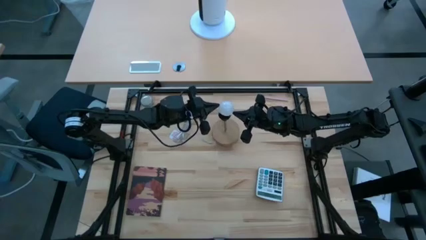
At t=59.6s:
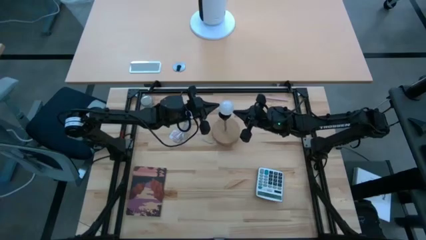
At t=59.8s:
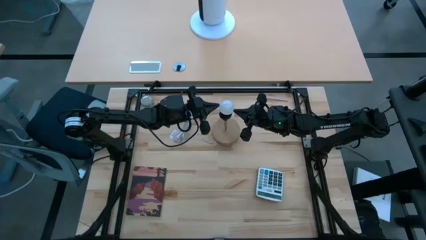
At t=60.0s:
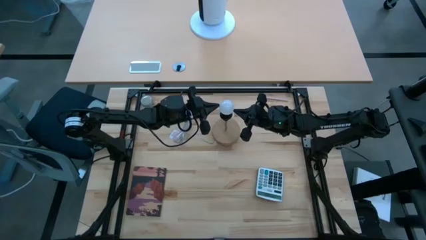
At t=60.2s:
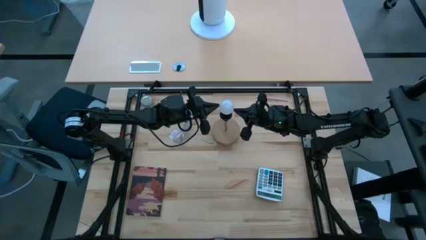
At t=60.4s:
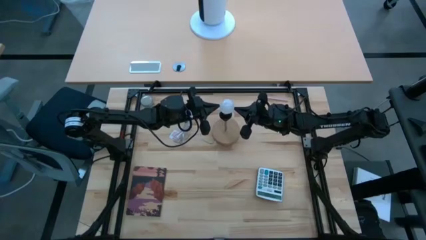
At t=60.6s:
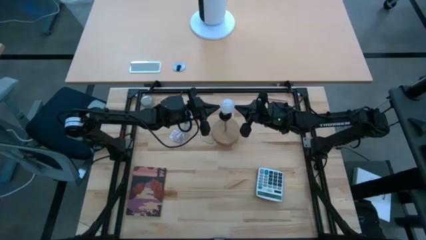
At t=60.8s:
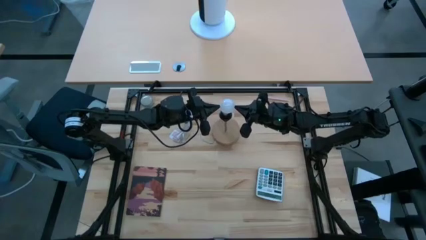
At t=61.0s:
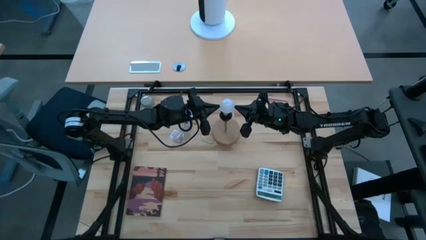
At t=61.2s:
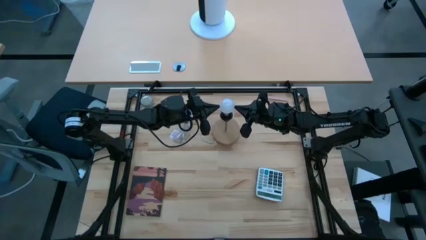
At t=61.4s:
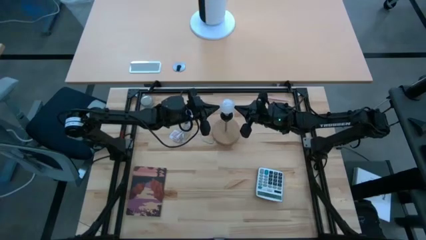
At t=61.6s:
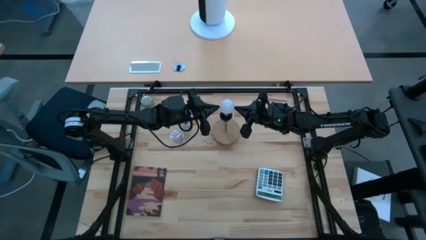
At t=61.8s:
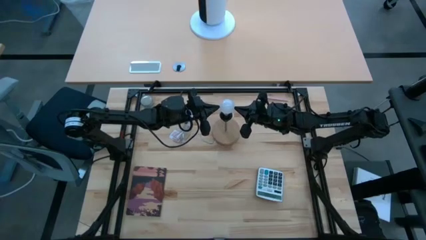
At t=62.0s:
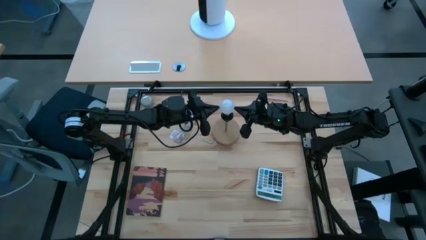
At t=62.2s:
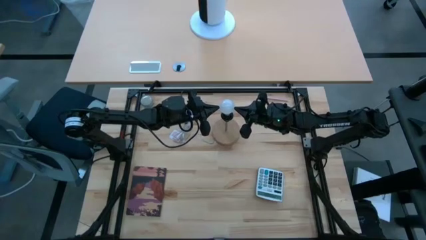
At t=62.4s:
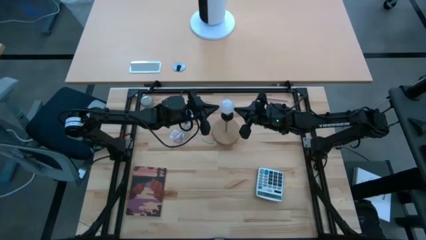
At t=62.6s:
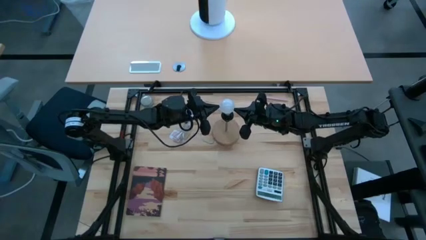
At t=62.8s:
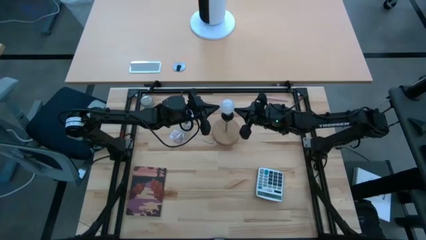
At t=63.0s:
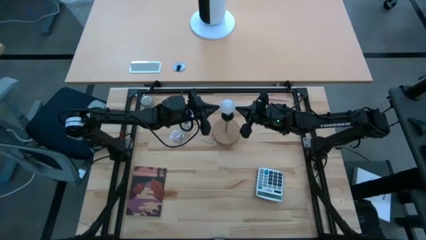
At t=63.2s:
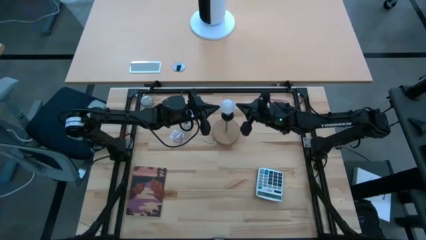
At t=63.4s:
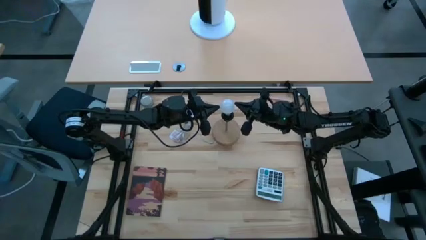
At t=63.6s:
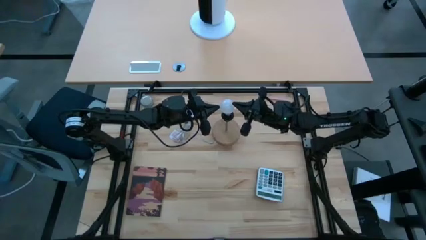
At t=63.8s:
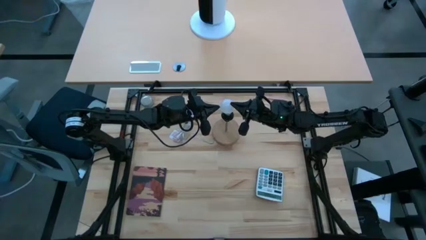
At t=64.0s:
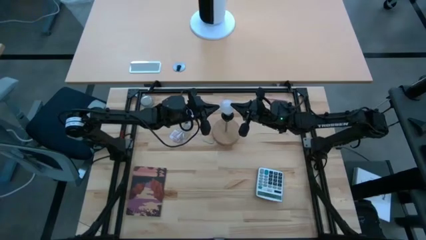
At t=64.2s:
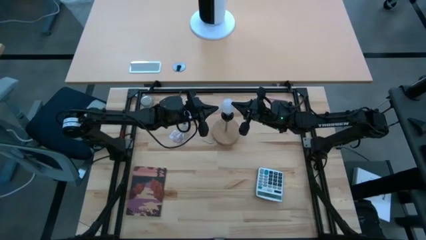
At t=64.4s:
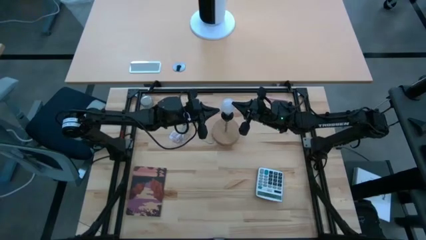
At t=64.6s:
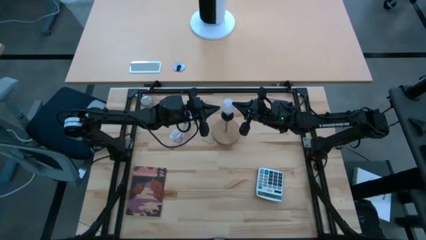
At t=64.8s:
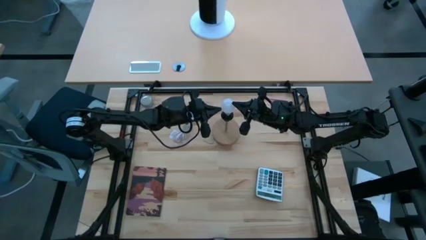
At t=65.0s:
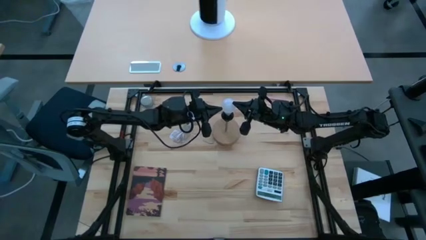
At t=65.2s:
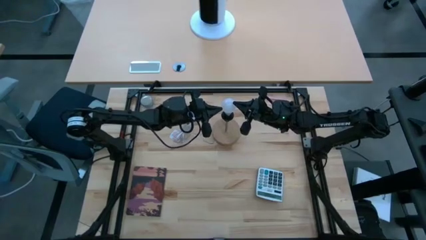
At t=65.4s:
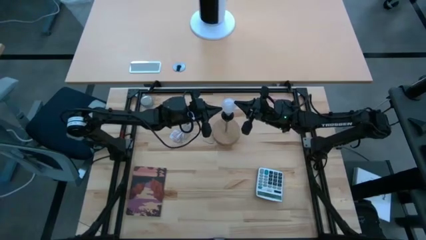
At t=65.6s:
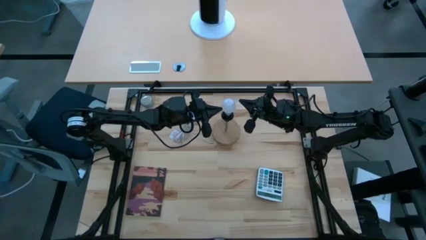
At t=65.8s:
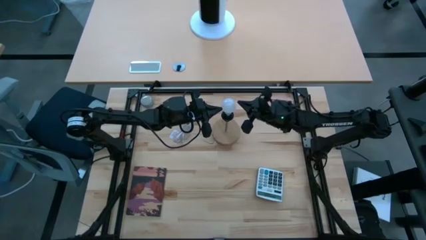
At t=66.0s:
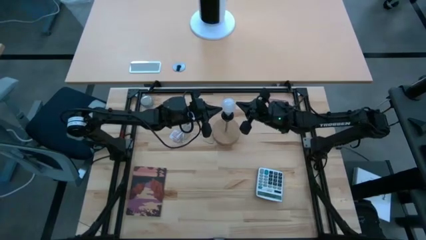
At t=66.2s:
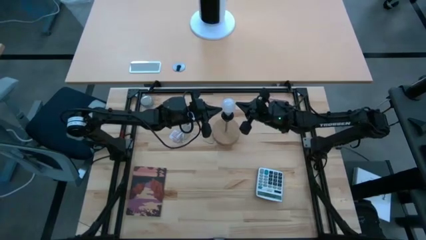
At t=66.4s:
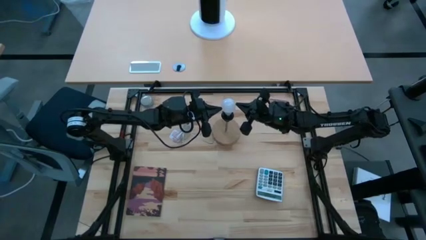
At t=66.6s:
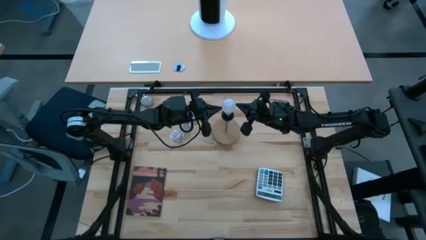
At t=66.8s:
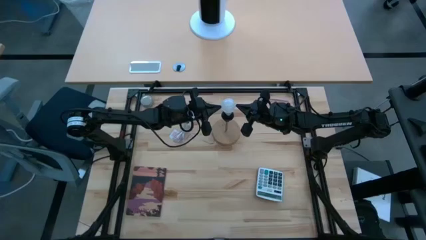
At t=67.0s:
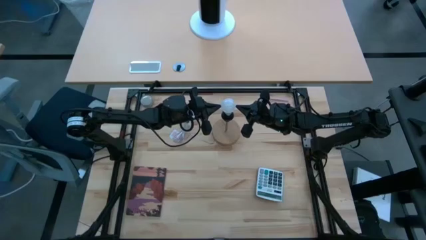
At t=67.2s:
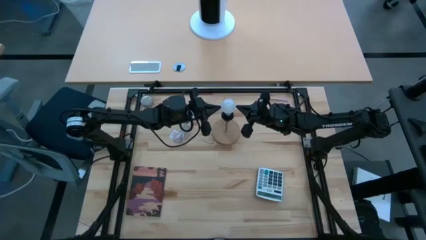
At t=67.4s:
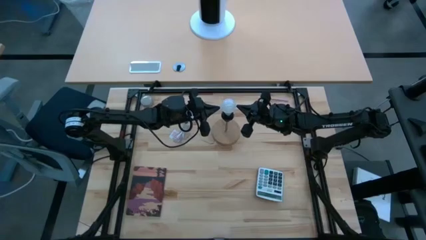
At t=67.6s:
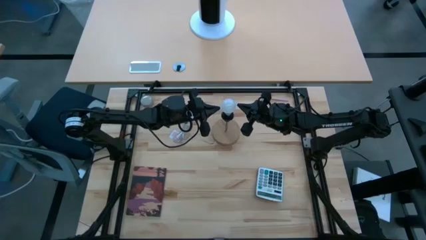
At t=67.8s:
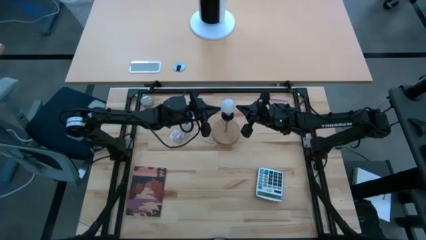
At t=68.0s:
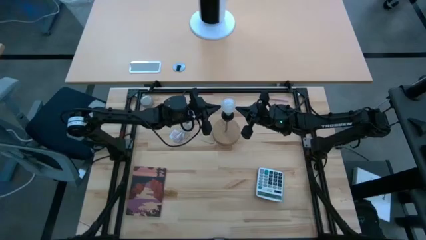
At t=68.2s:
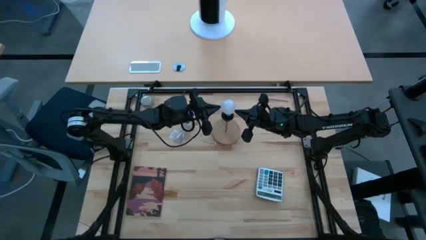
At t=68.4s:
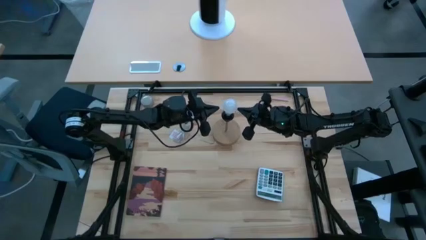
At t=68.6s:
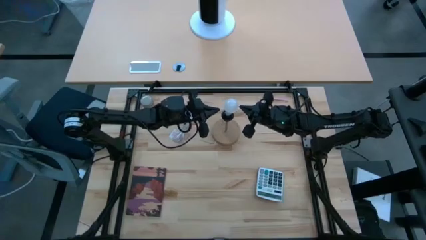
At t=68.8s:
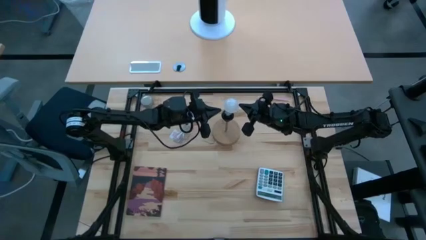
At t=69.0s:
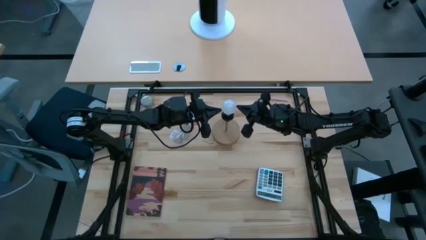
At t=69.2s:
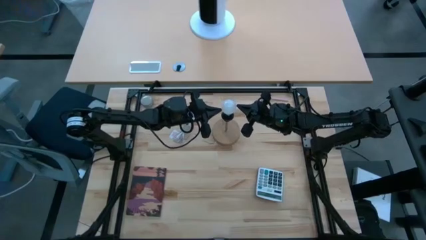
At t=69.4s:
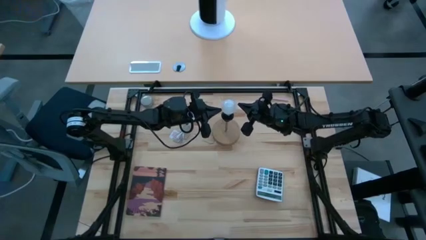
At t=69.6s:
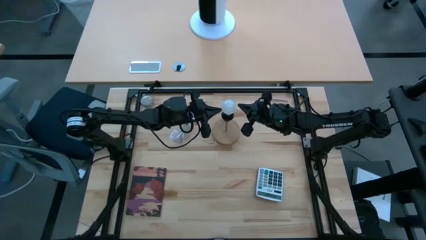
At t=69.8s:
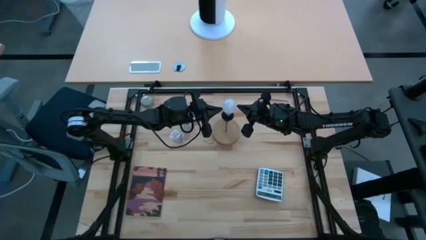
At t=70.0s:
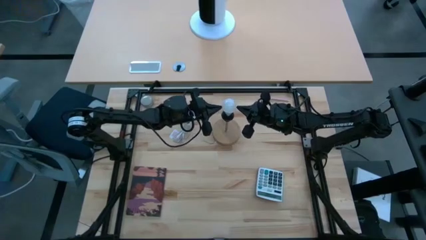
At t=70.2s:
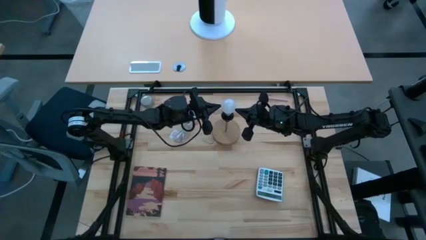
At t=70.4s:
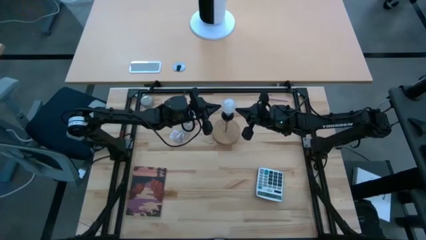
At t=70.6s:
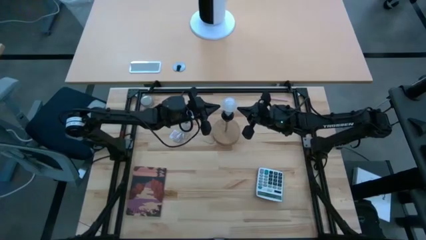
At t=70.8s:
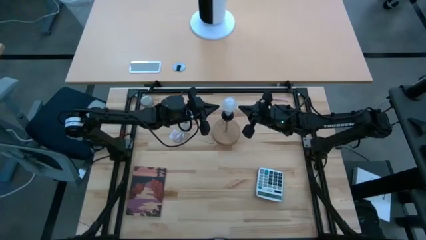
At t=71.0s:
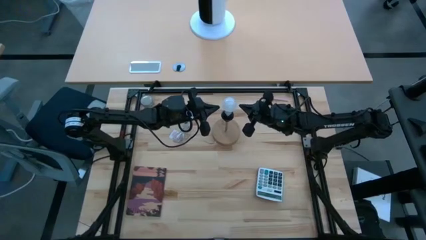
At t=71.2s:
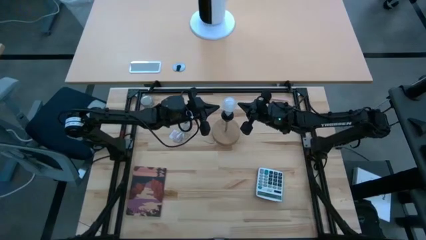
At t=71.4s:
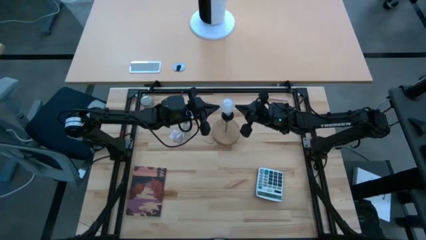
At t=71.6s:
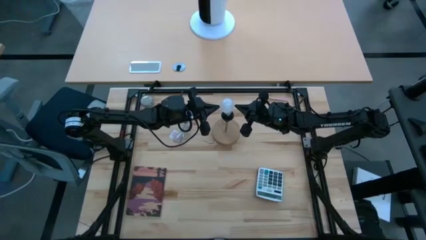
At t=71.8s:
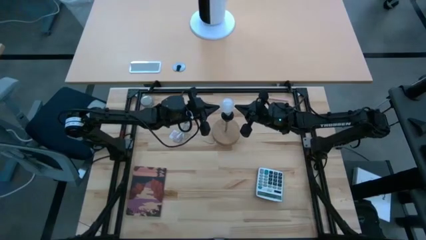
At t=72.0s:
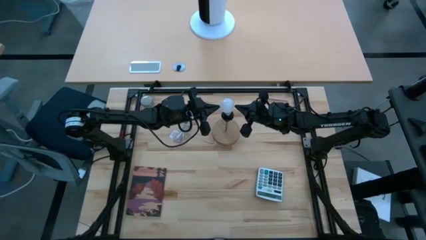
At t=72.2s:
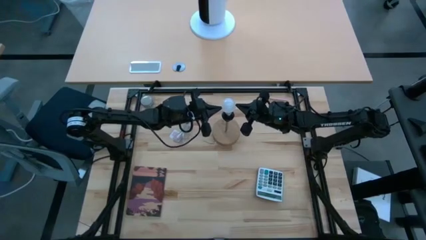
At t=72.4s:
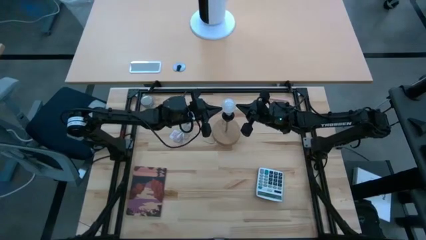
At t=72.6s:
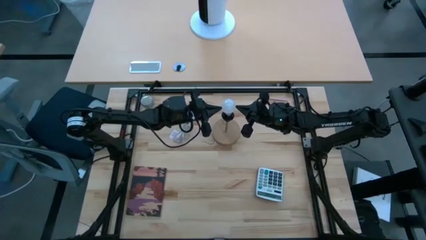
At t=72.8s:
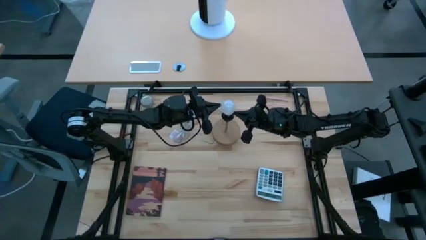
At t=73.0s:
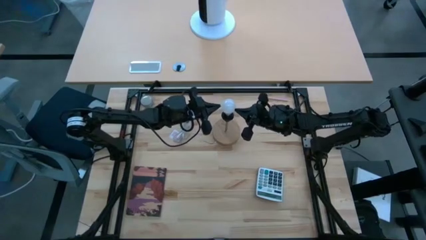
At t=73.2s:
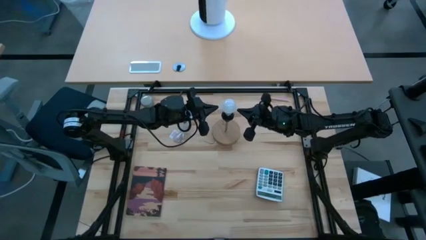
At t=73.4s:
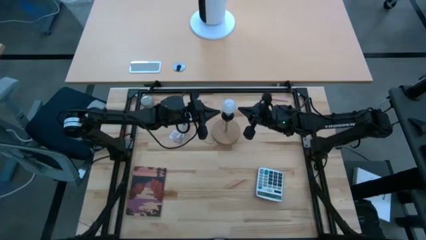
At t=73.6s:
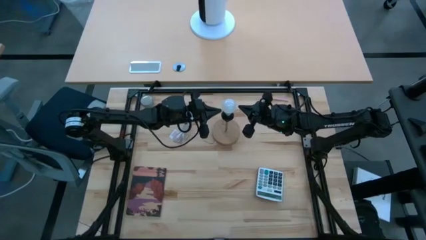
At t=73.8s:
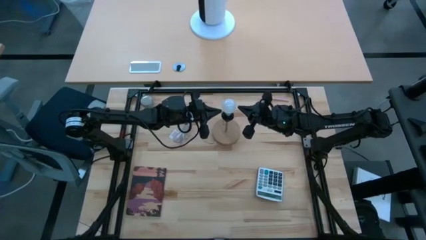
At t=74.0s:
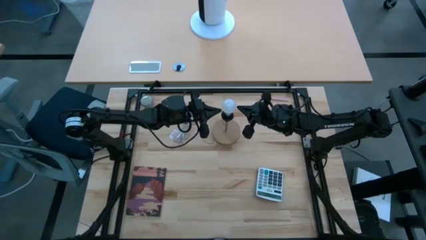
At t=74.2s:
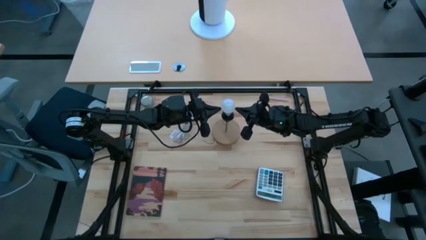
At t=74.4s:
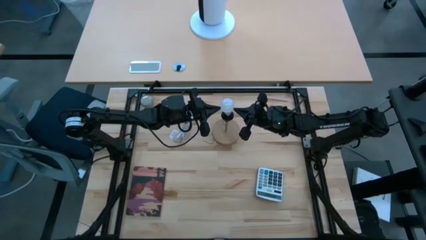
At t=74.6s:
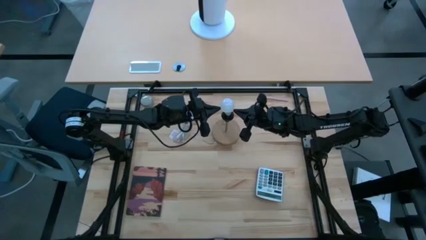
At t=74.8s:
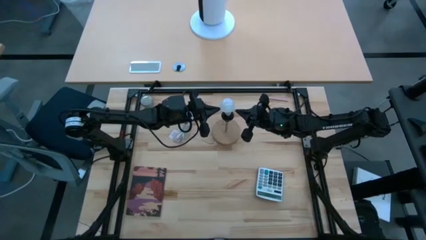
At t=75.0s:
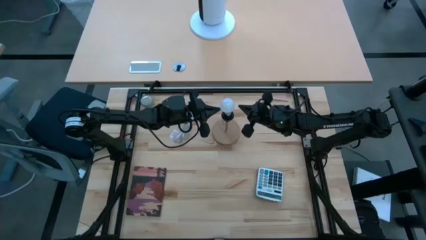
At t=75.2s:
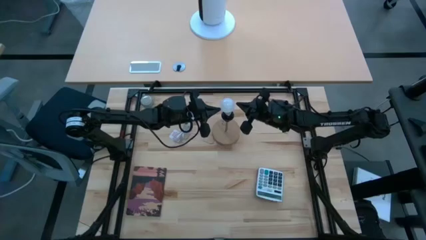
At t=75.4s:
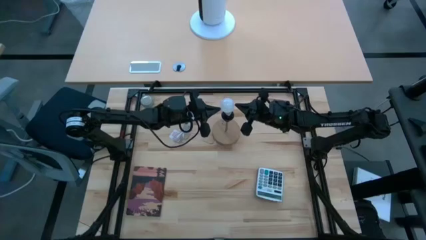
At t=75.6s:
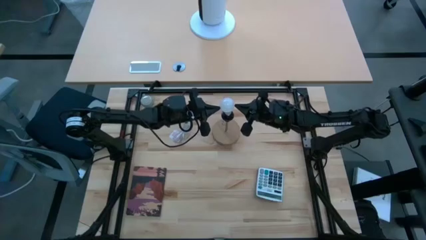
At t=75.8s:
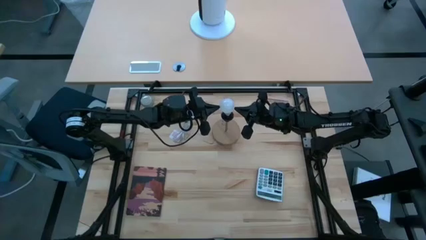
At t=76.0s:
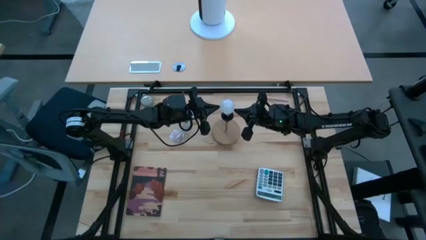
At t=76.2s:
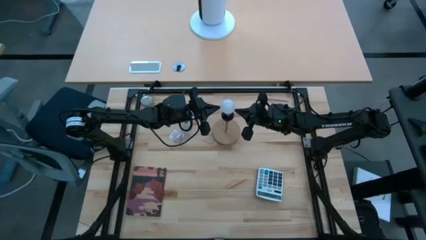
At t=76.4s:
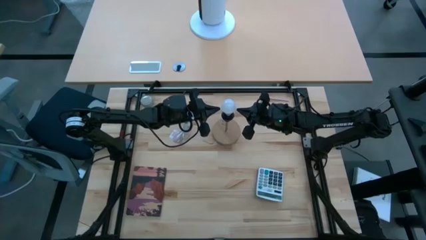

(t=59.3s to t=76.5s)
Task: Screw lightbulb
Insert the lightbulb into the lamp
